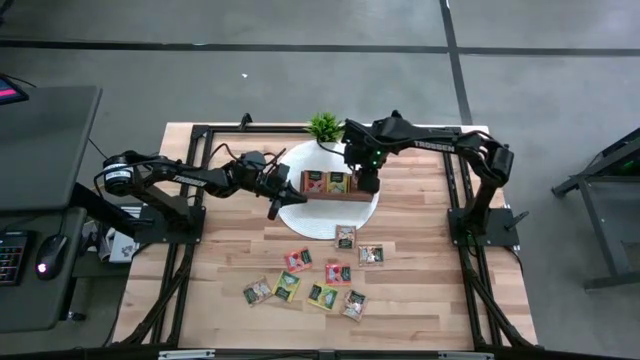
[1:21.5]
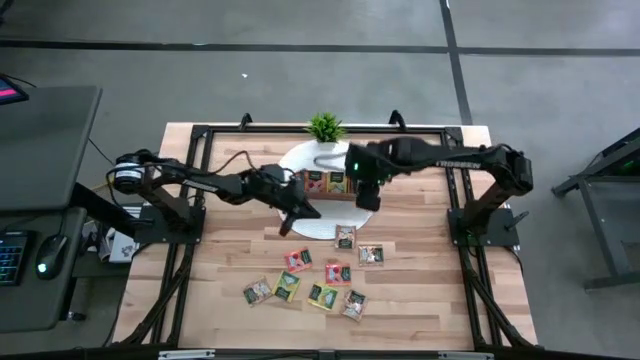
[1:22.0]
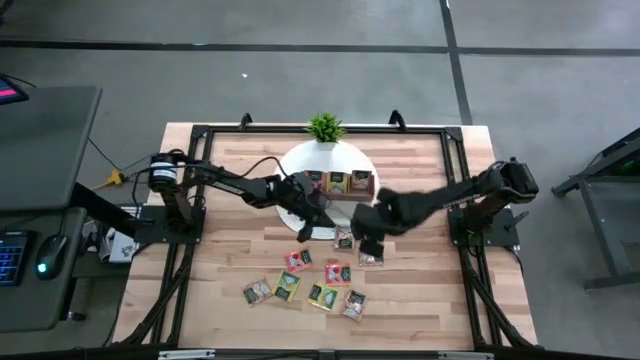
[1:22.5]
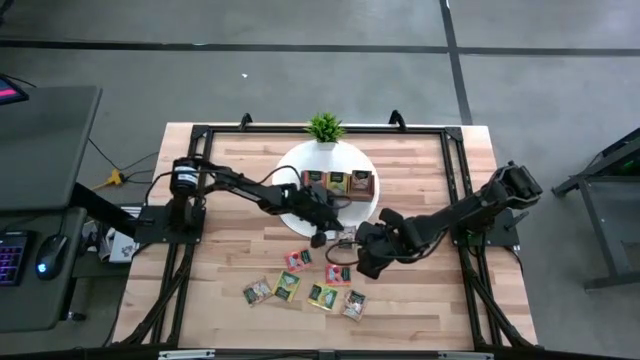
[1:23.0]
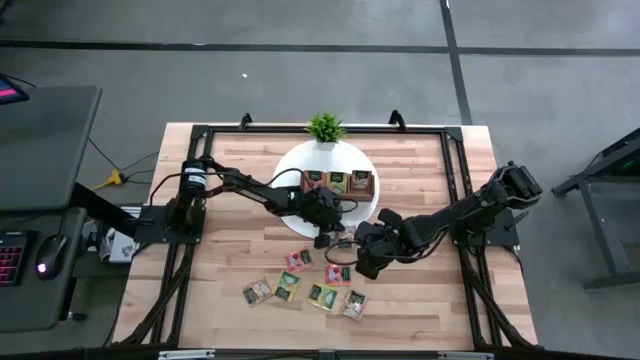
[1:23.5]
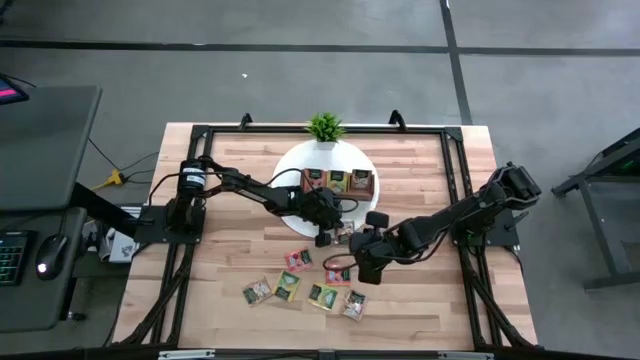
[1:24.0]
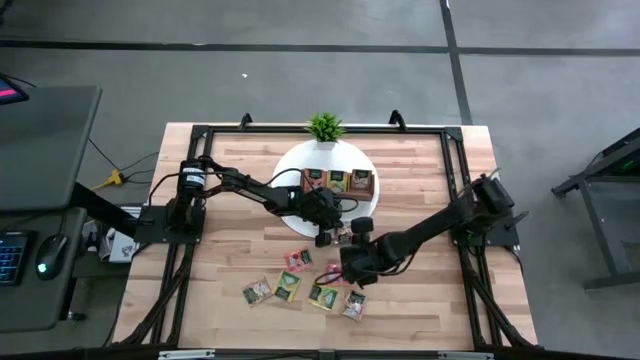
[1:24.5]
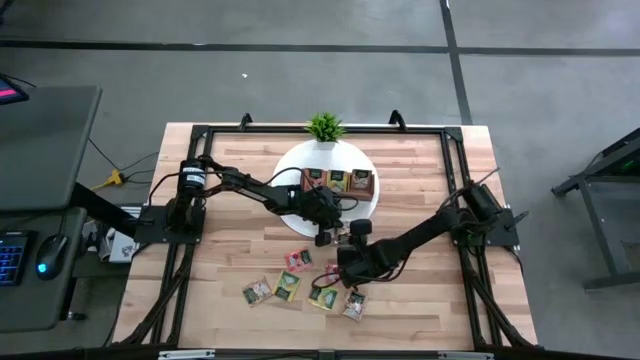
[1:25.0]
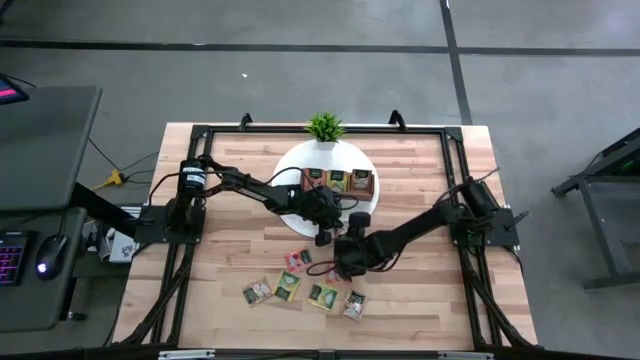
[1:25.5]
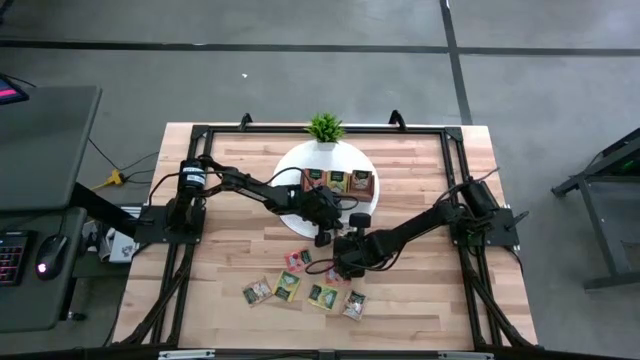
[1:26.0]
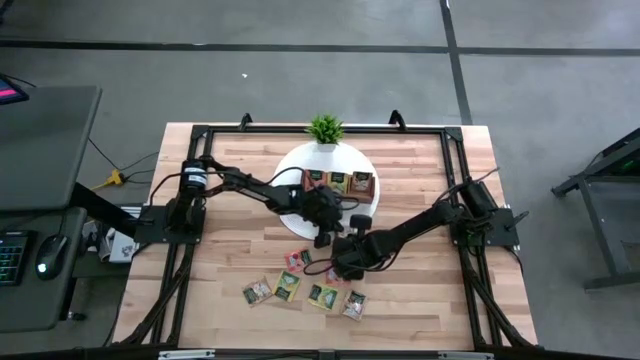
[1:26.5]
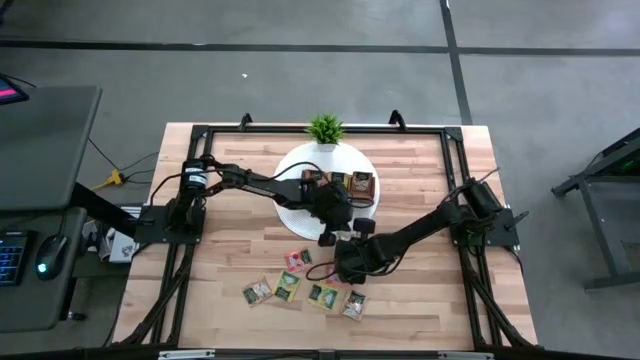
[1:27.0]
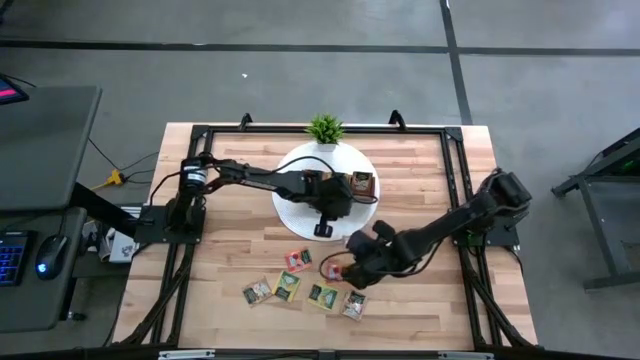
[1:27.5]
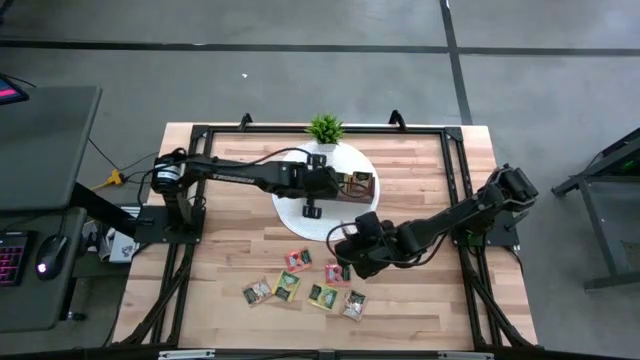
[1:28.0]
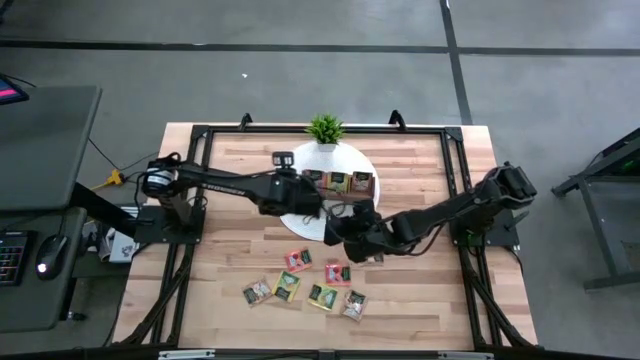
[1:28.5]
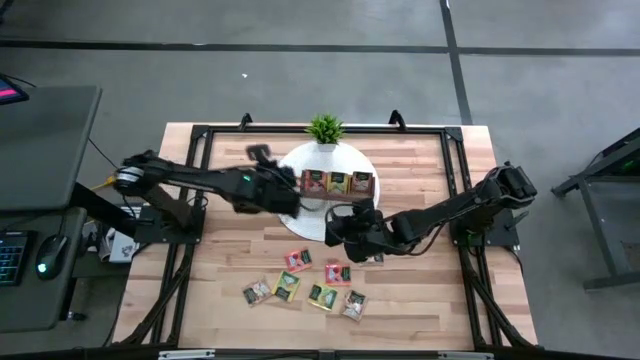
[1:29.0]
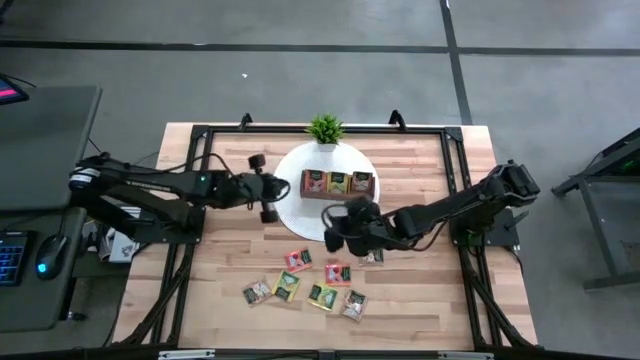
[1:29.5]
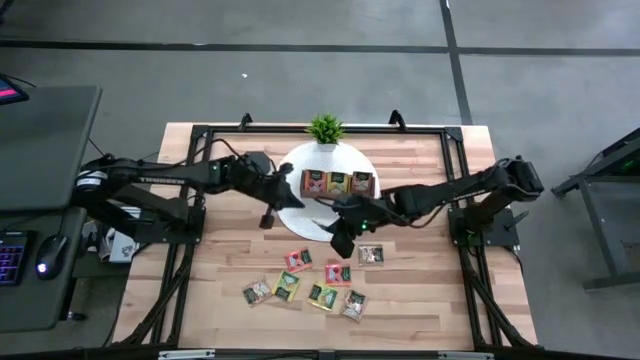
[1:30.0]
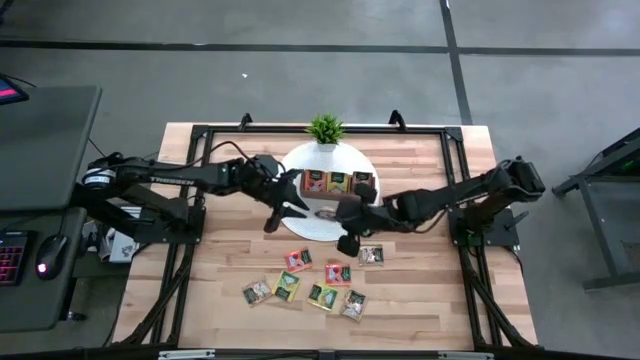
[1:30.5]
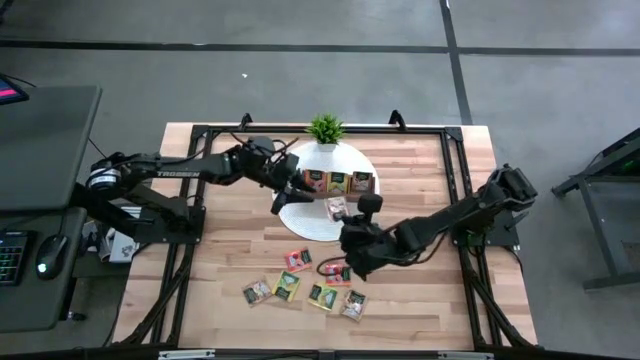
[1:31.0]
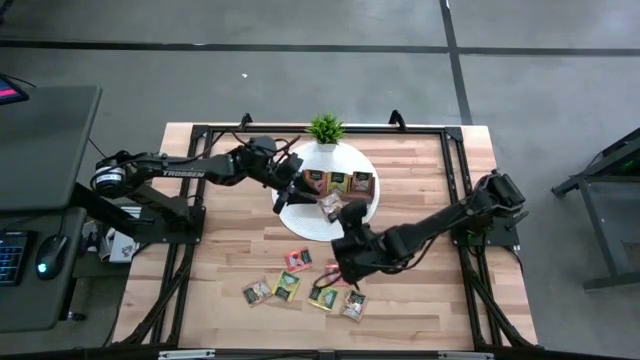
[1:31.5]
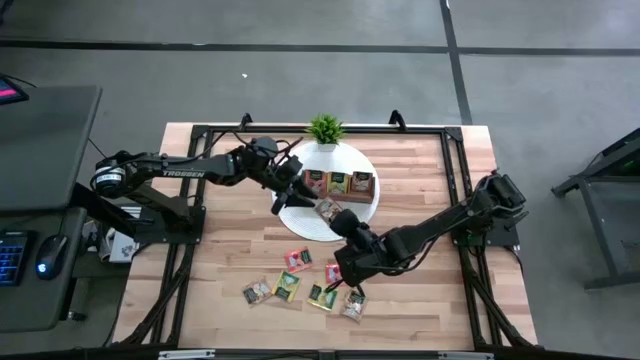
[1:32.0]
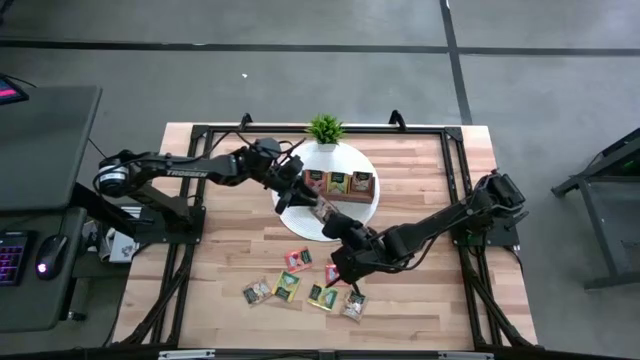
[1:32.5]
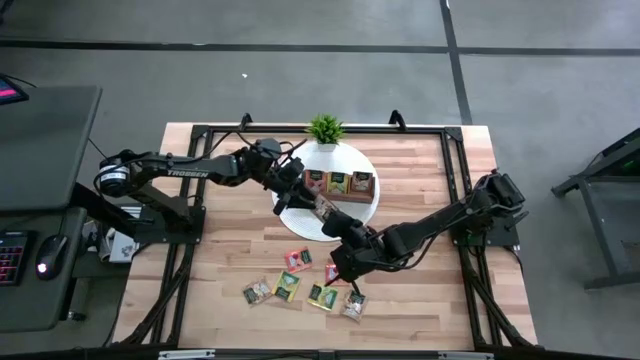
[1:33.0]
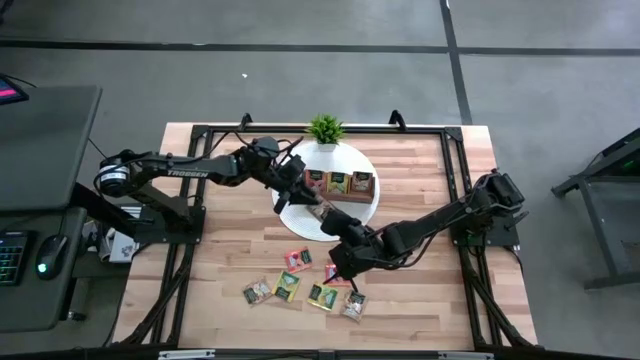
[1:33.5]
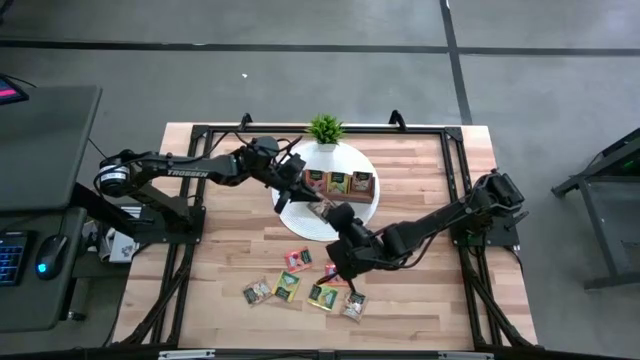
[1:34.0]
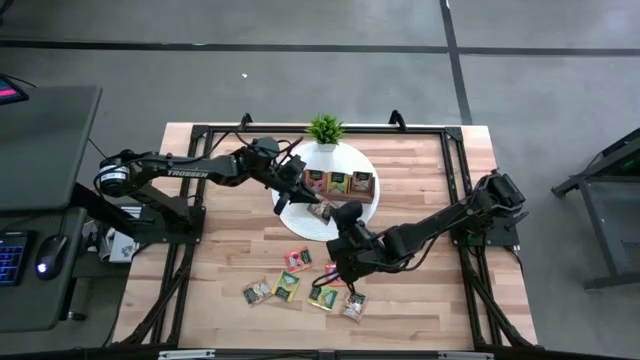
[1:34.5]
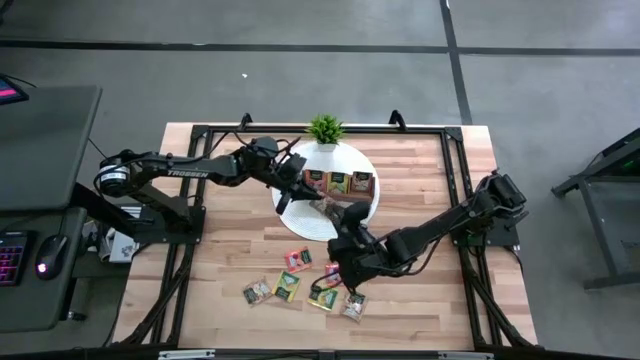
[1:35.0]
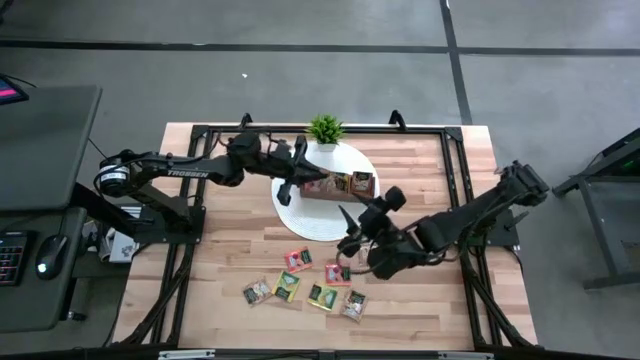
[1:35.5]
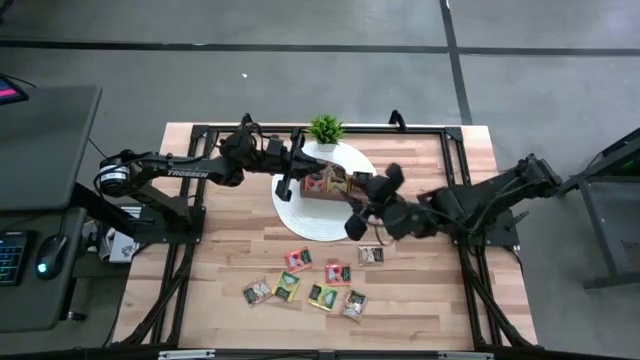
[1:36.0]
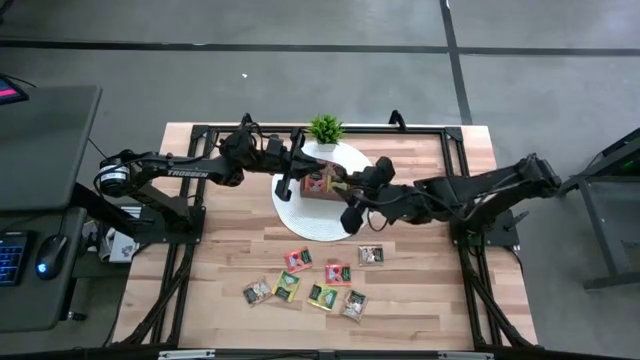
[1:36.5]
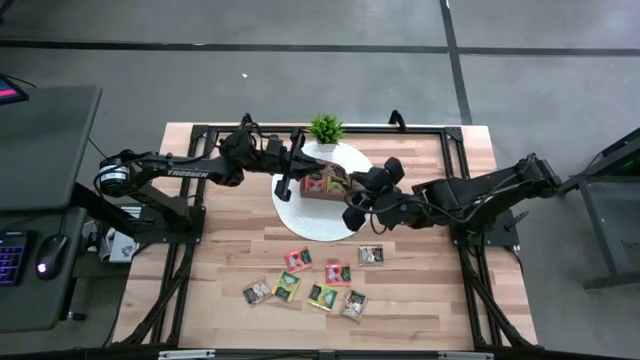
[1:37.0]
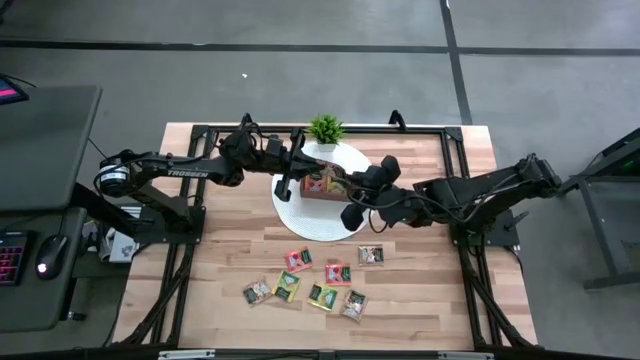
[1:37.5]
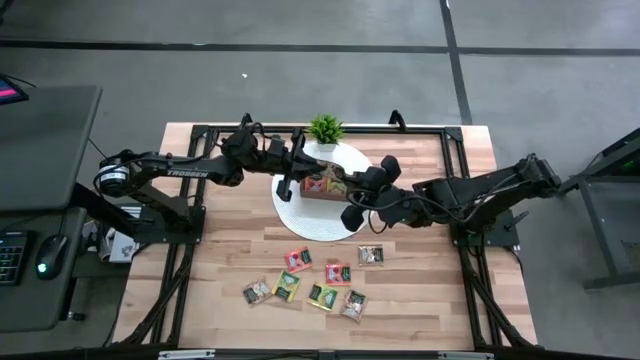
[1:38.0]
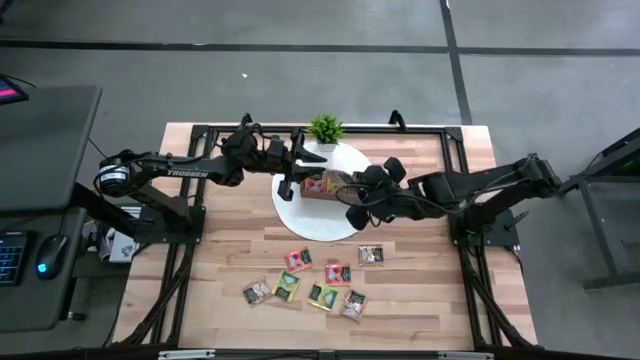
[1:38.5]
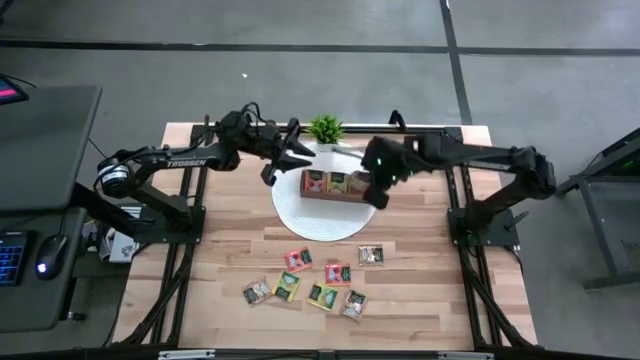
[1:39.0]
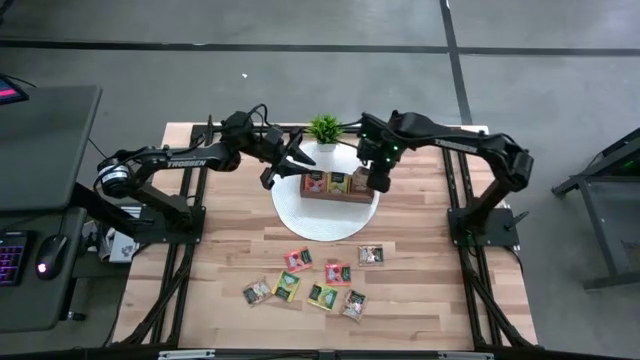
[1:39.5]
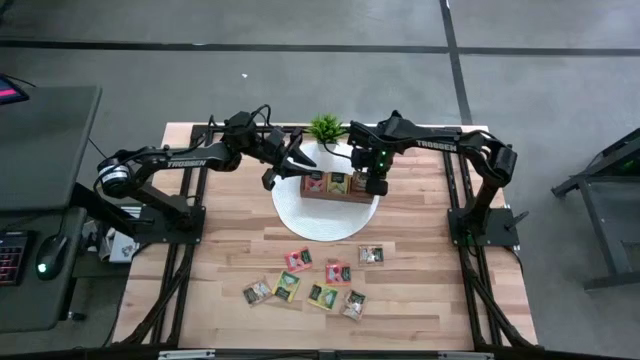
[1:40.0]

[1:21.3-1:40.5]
Task: Pick & Place Tea
Put the brown tea bag into the right section of the wooden organizer

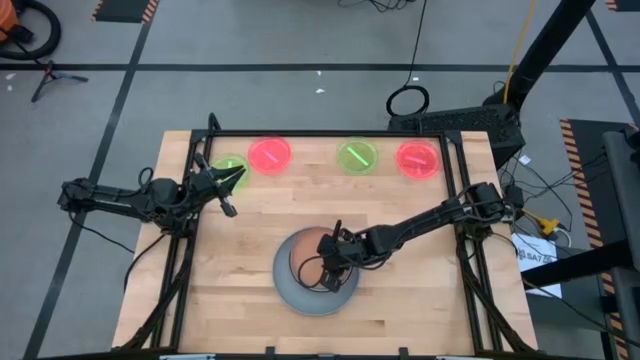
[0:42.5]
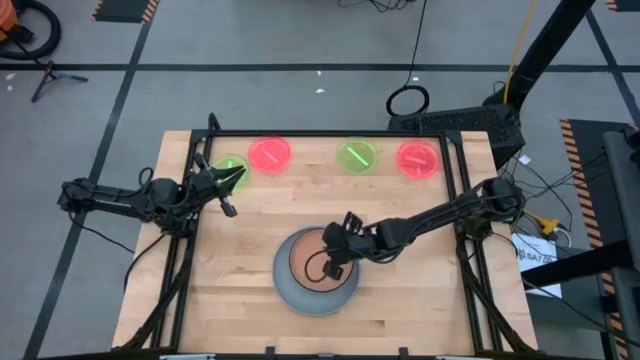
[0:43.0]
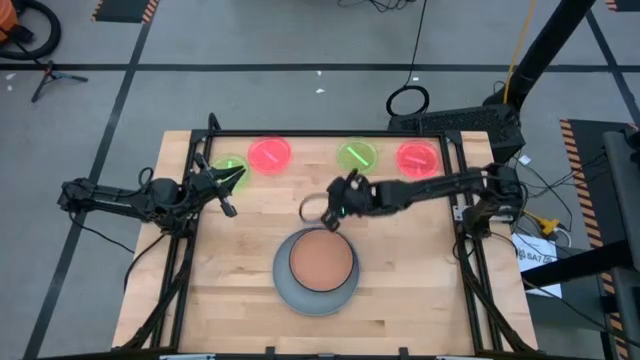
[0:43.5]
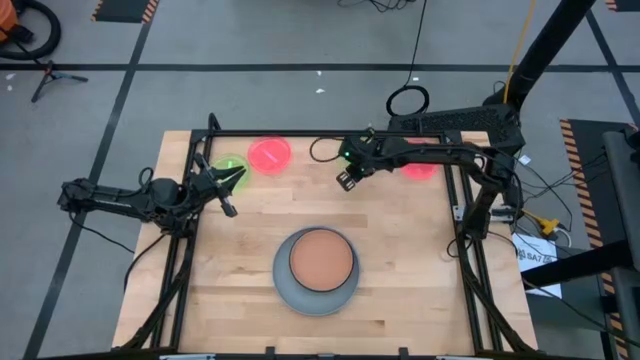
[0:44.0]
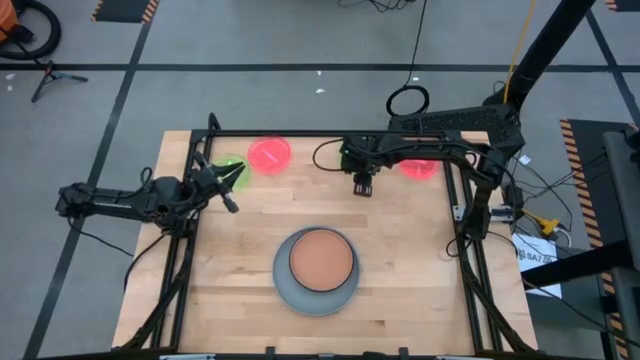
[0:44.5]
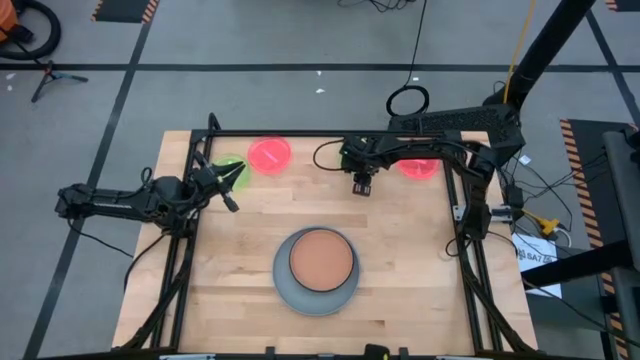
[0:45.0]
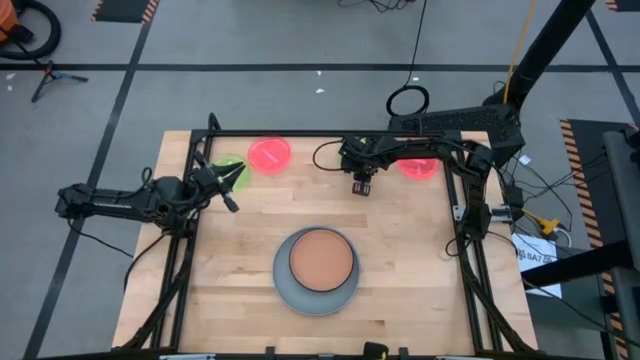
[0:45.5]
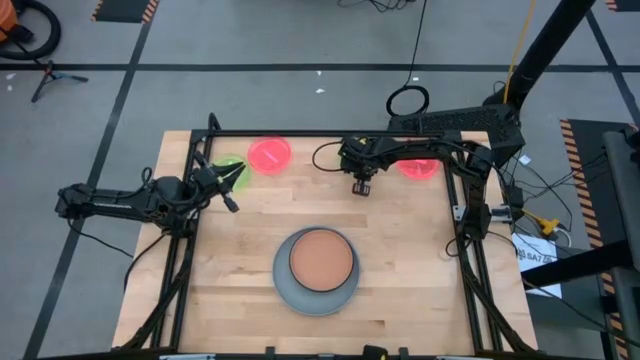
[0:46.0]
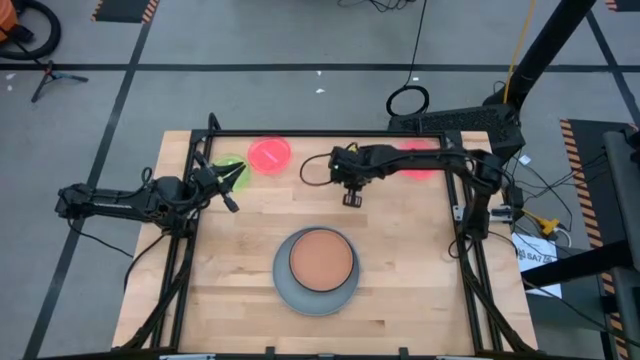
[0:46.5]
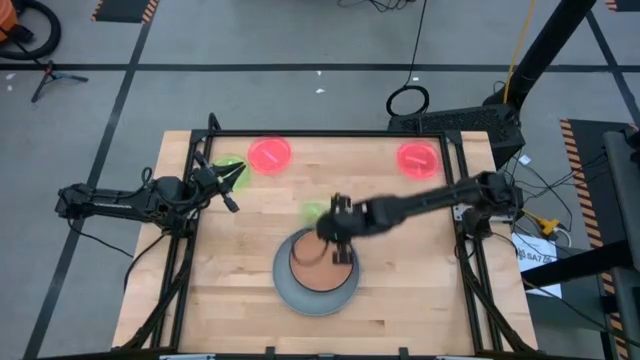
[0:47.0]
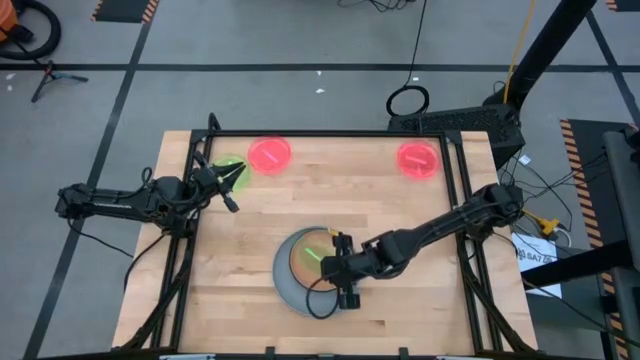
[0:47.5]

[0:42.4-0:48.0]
Task: Stack plastic plates
Stack the right green transparent plate on top of the brown plate
